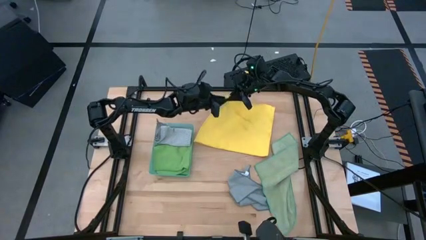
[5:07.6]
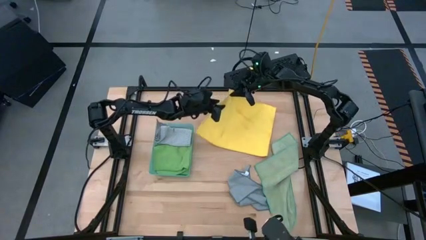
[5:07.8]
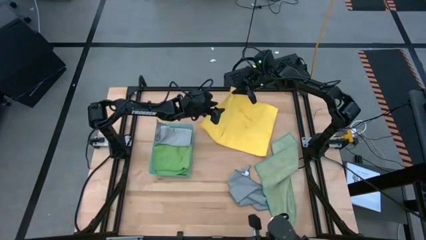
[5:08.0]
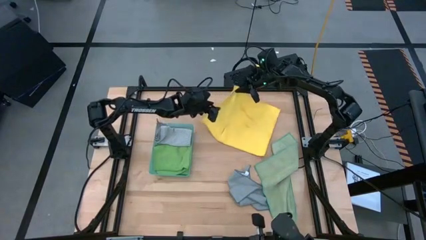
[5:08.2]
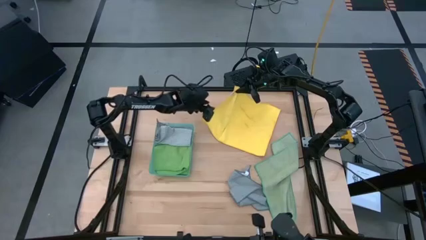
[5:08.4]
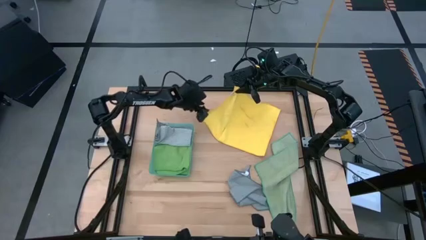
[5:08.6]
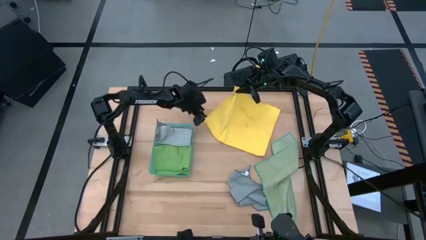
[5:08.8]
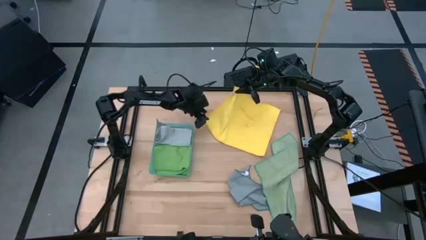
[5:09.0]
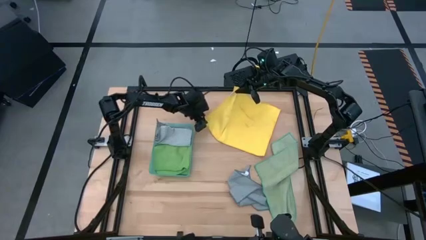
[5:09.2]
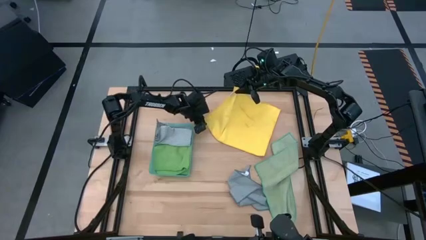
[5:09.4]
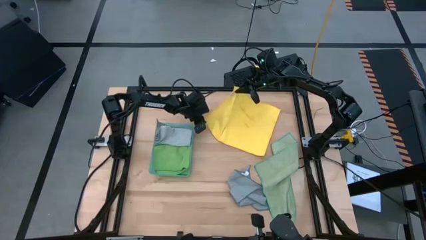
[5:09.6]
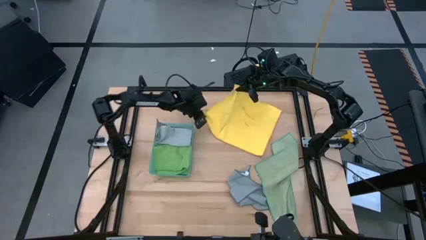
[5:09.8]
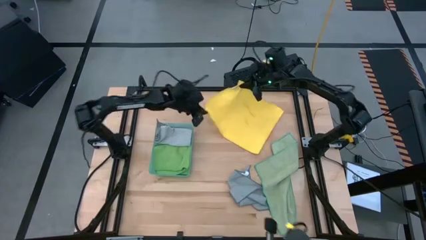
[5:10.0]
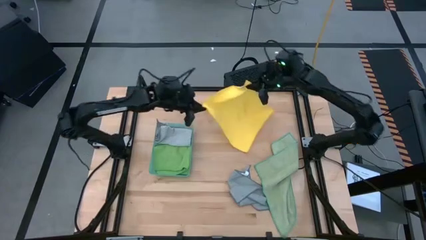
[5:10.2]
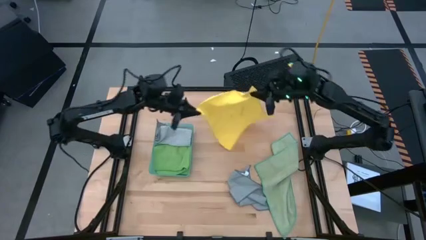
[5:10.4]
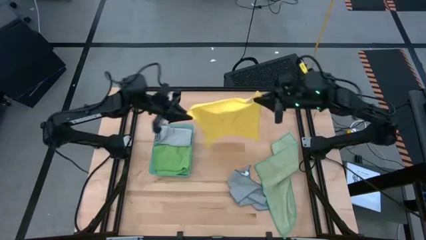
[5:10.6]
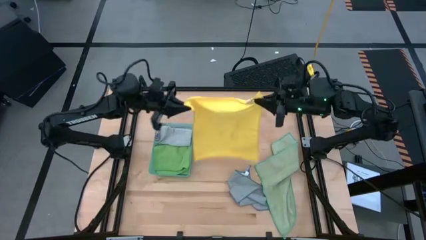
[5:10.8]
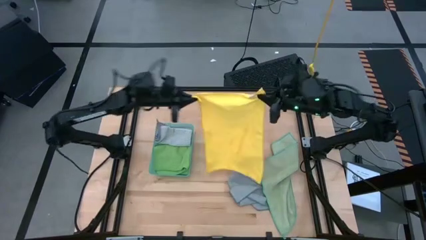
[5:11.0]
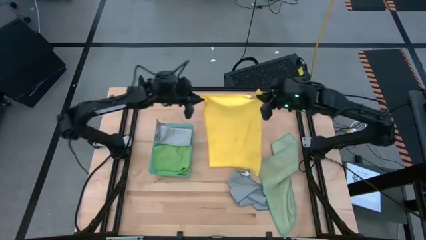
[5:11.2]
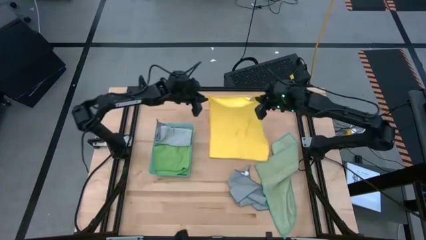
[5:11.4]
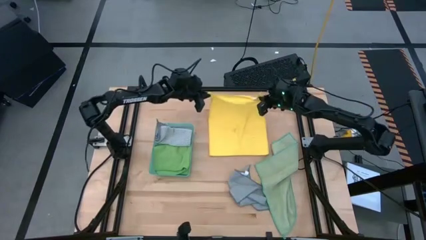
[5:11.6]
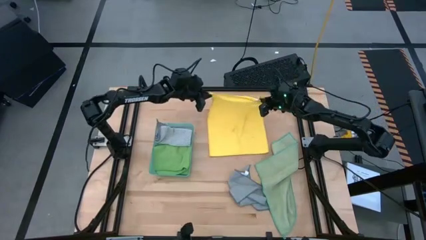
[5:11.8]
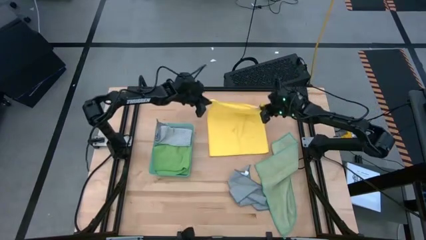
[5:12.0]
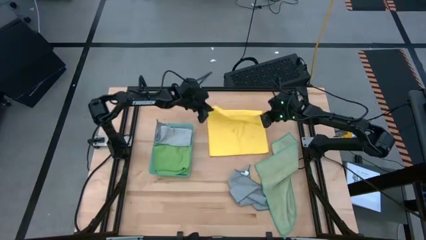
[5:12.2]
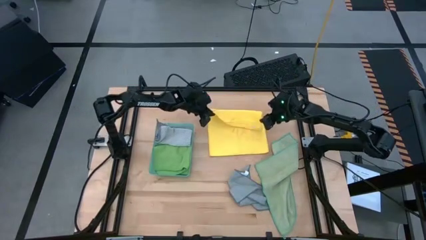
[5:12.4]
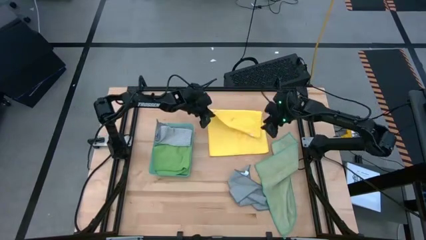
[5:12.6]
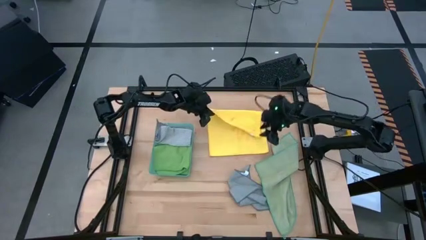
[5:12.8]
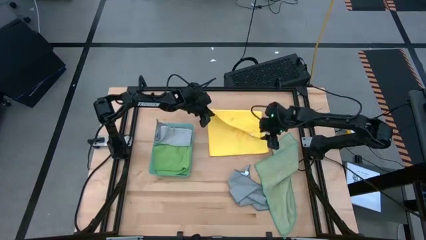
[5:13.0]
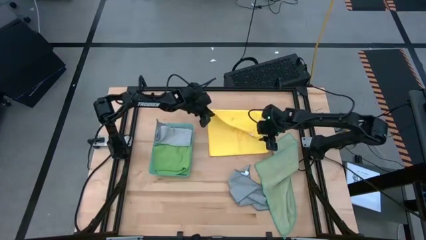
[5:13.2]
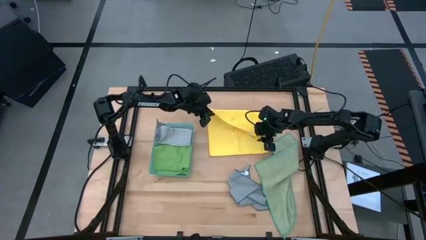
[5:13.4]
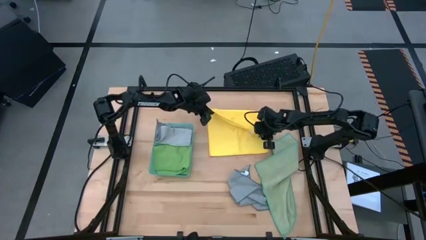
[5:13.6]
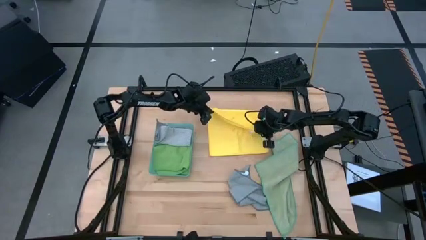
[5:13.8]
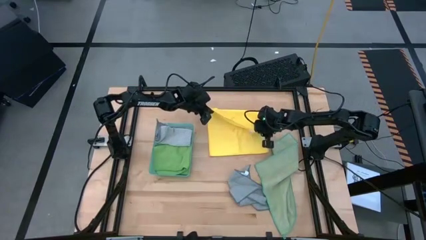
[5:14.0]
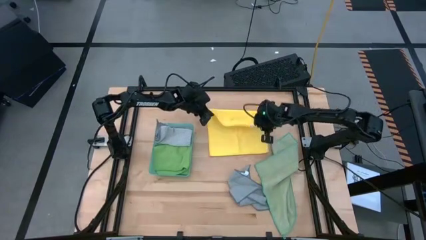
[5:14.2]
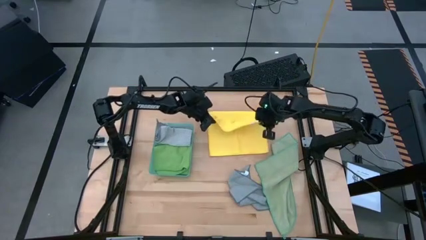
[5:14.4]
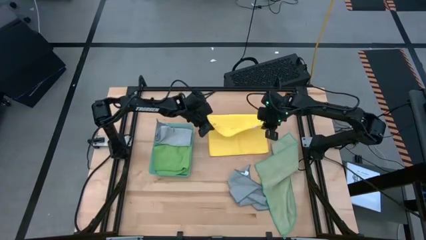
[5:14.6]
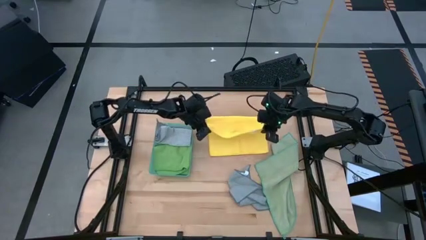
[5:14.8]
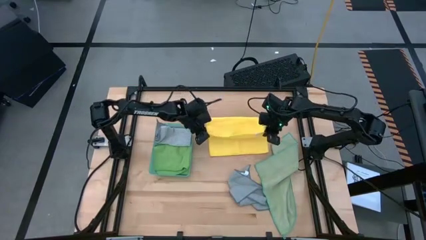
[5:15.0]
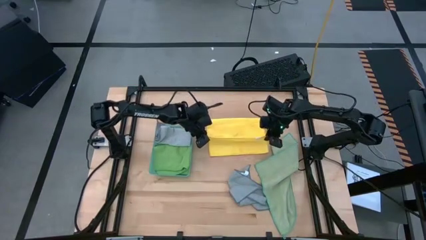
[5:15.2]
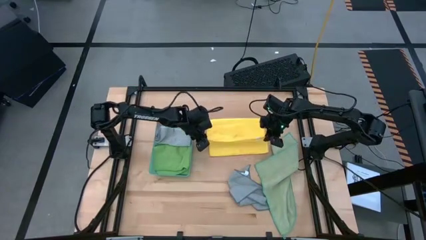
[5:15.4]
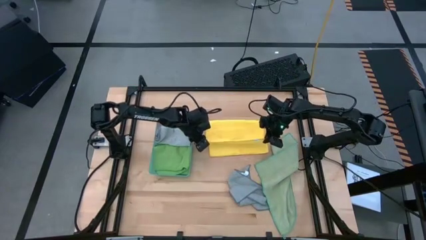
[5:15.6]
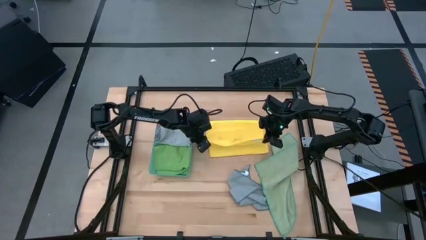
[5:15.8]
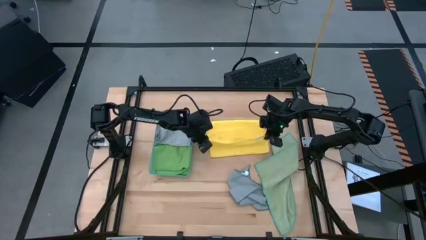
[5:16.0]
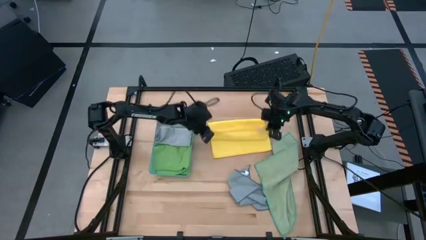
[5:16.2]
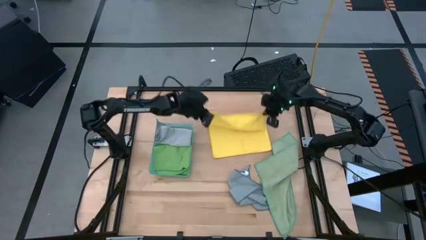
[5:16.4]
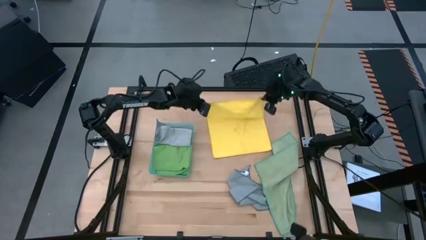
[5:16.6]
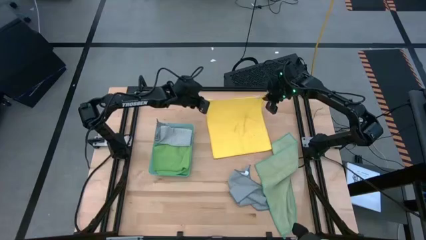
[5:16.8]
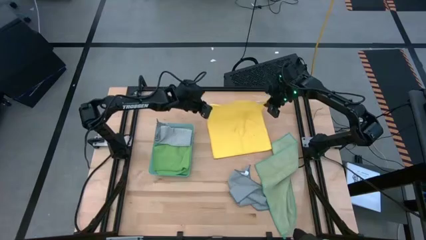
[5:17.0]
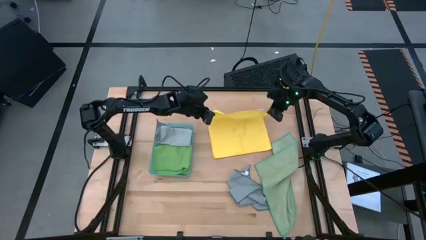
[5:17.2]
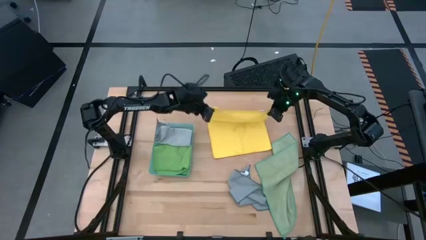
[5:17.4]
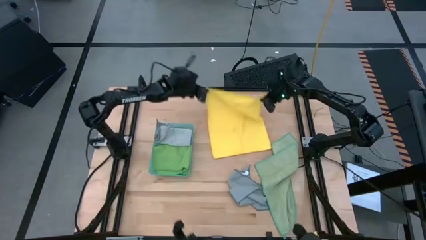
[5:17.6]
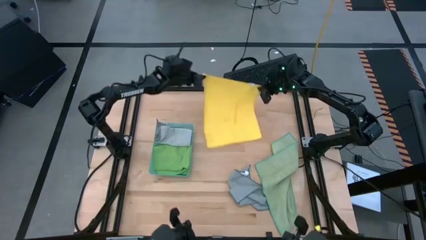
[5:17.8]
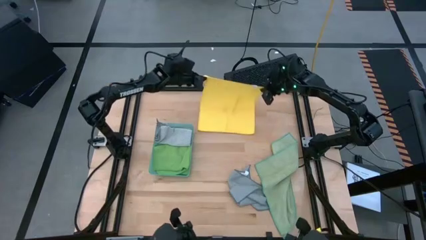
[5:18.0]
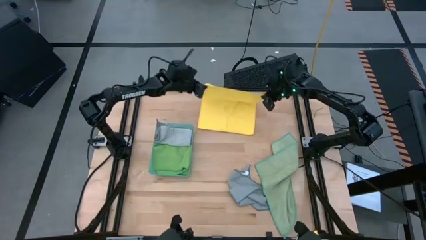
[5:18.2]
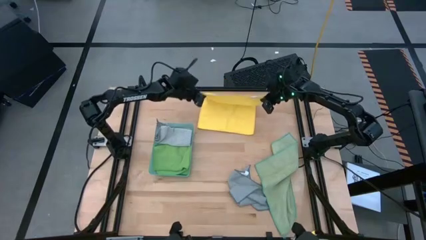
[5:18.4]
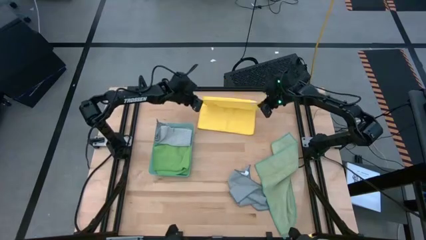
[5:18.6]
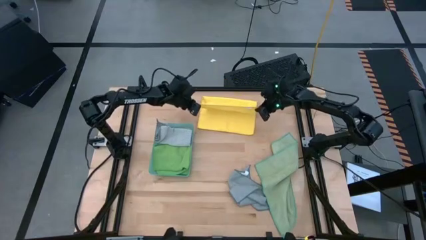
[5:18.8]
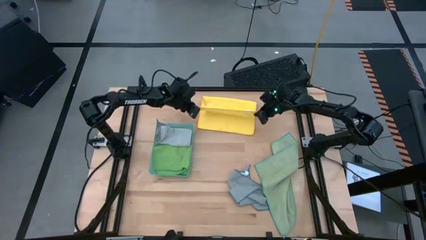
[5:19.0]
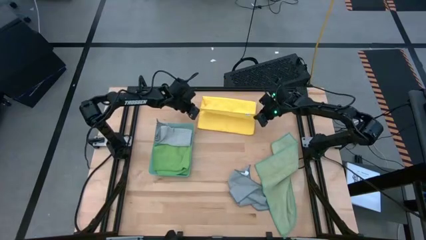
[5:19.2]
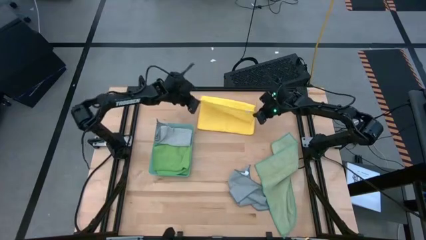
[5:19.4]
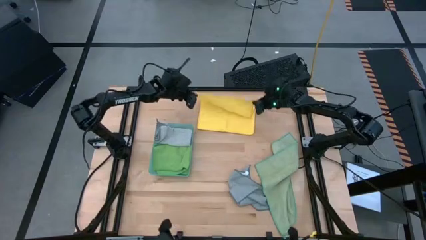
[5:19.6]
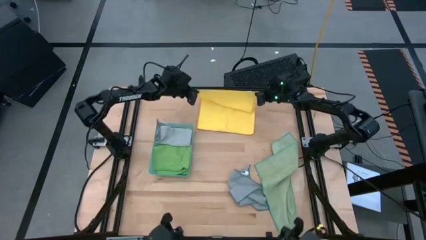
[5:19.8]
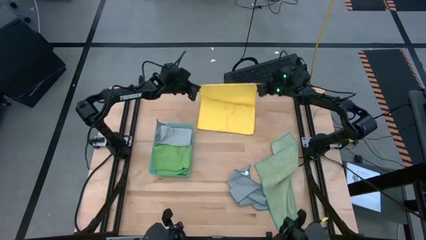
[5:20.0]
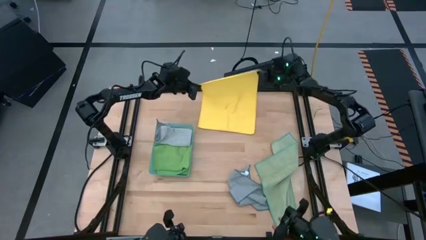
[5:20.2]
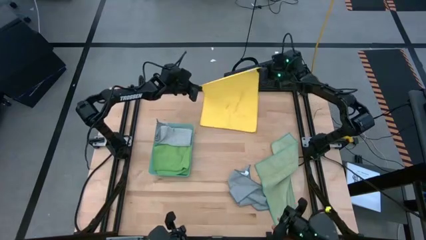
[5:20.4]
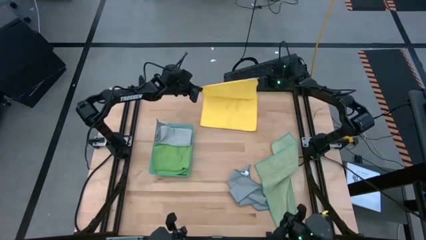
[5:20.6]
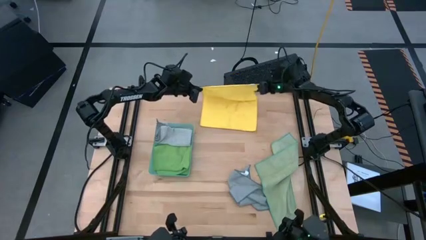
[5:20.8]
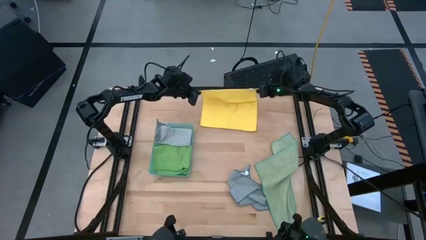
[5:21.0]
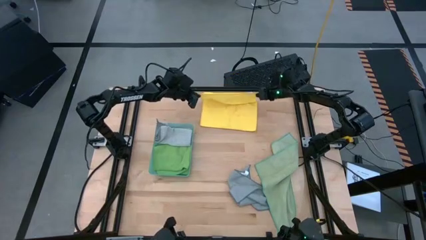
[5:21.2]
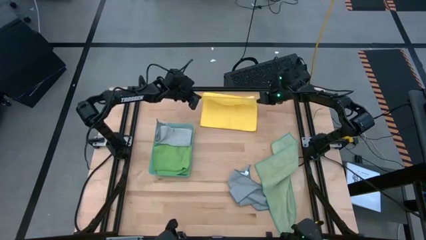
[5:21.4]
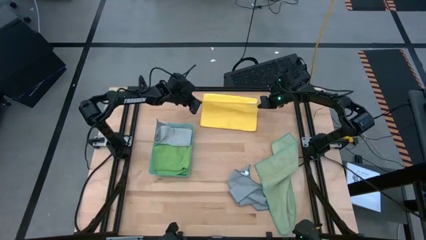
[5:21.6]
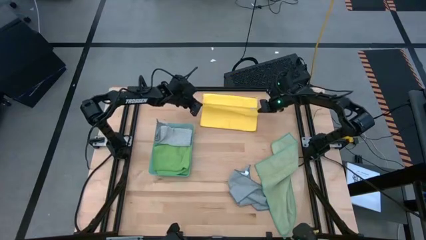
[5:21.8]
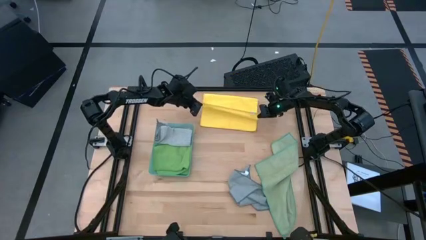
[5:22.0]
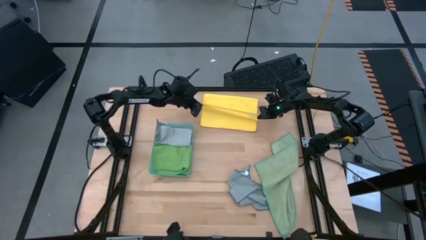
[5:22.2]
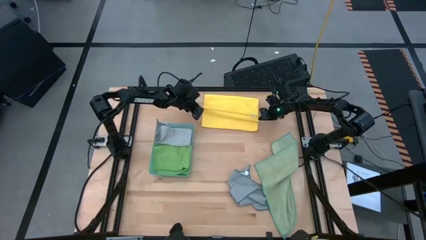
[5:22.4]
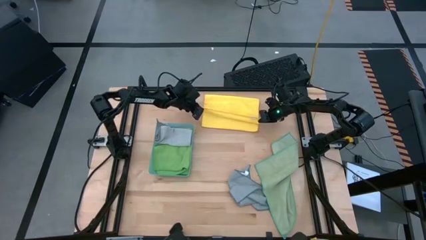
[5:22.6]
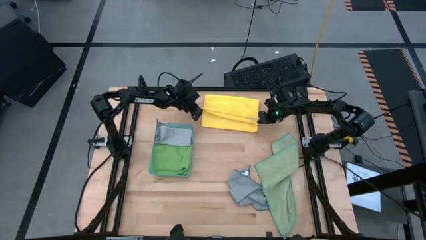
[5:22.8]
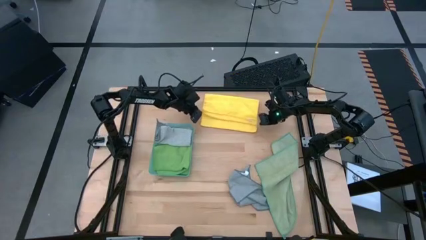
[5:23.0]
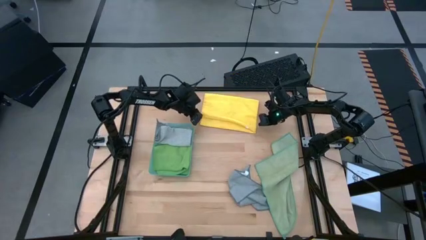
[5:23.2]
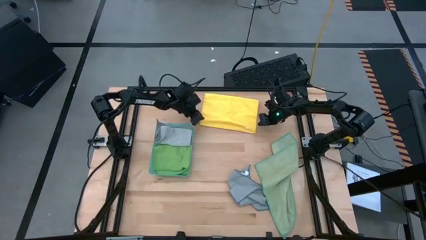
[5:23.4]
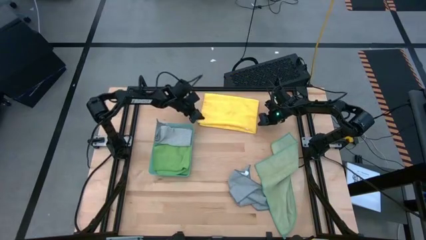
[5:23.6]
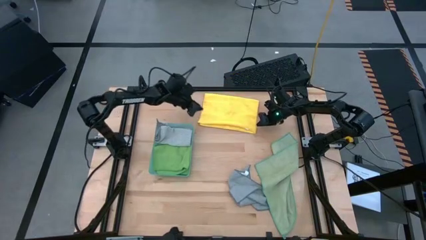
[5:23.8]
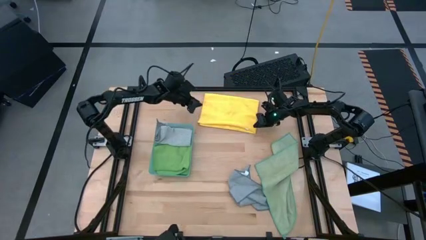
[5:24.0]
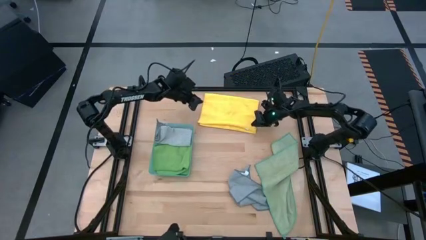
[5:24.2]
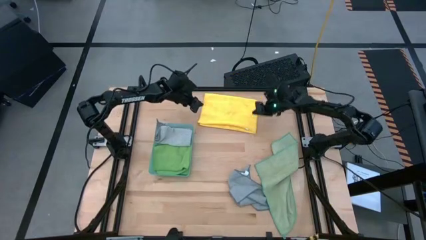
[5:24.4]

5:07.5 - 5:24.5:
Task: Fold microfiber towels
Fold the yellow microfiber cloth
